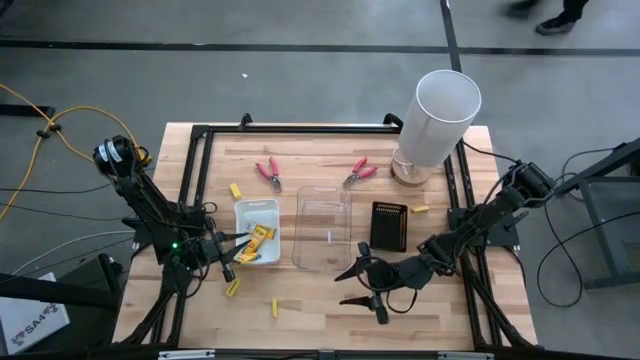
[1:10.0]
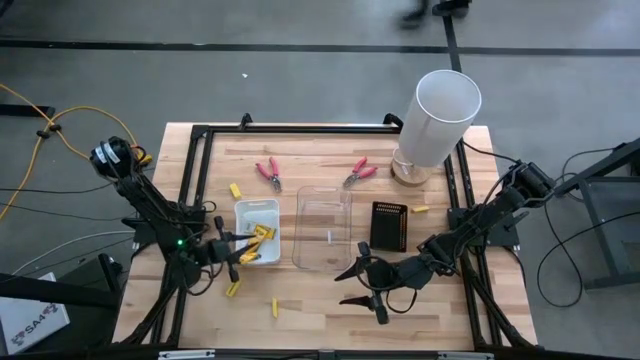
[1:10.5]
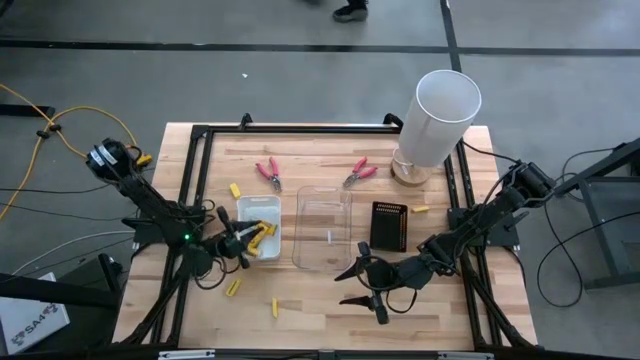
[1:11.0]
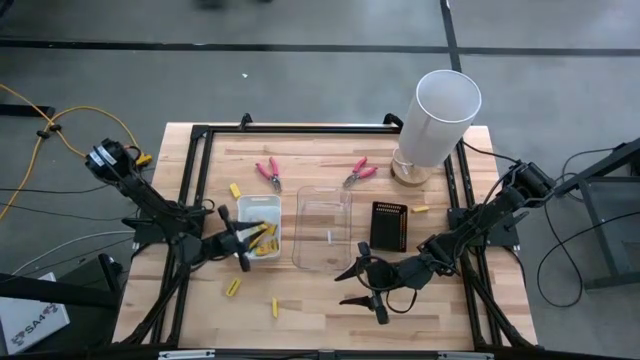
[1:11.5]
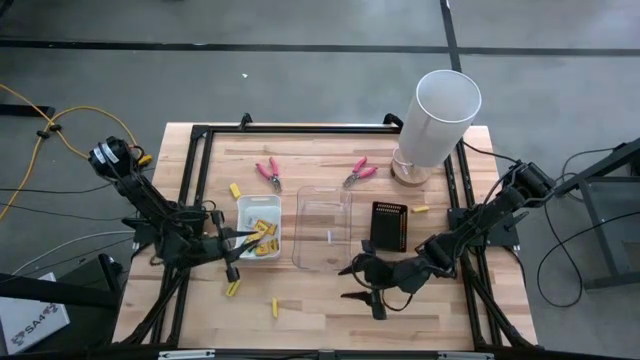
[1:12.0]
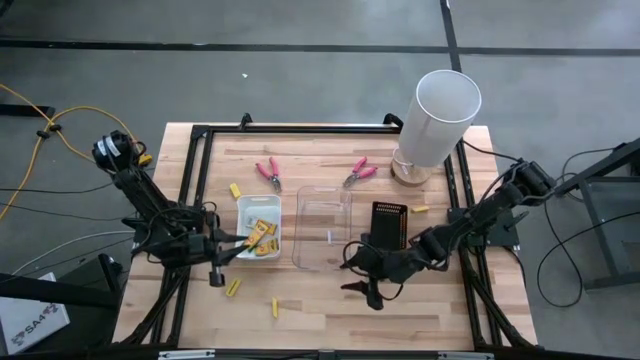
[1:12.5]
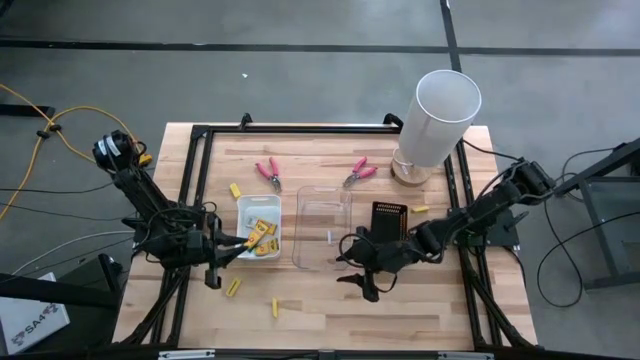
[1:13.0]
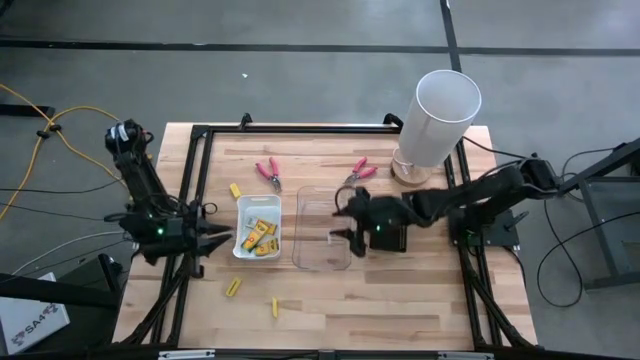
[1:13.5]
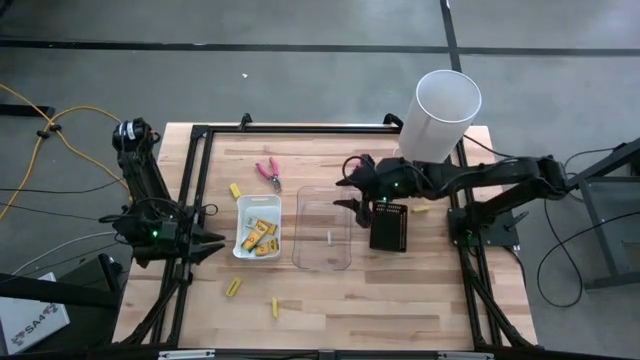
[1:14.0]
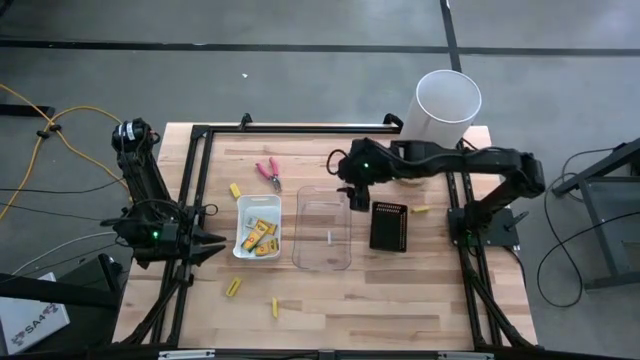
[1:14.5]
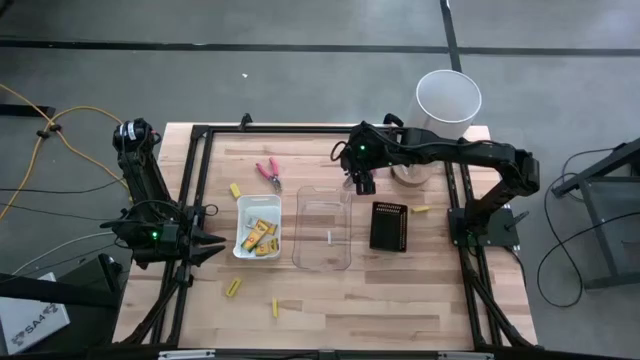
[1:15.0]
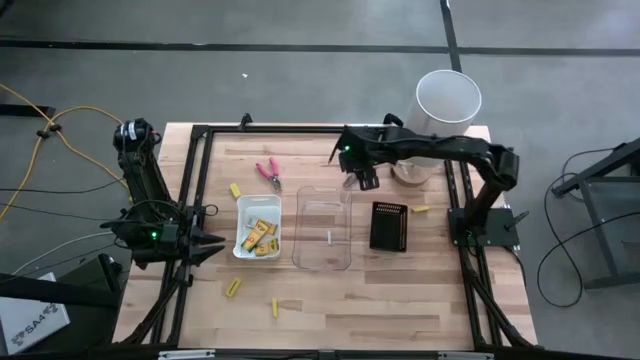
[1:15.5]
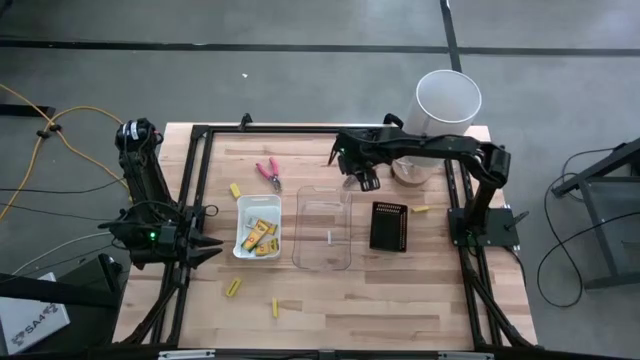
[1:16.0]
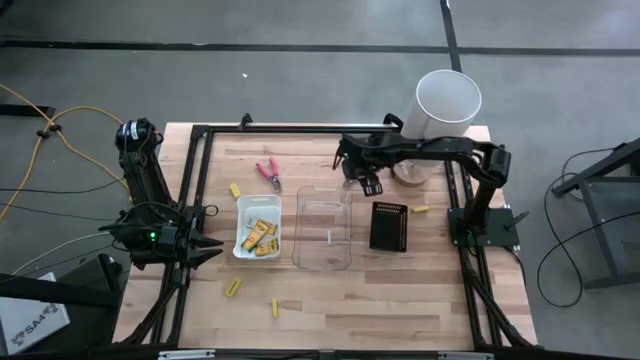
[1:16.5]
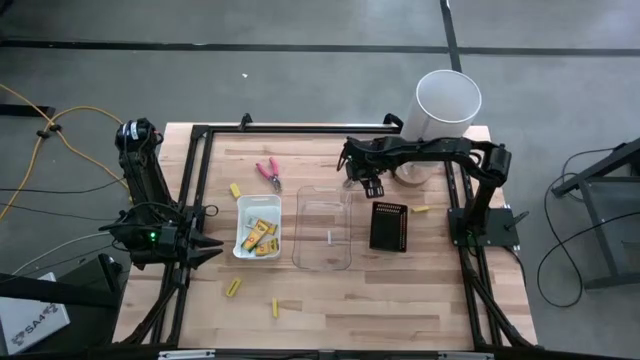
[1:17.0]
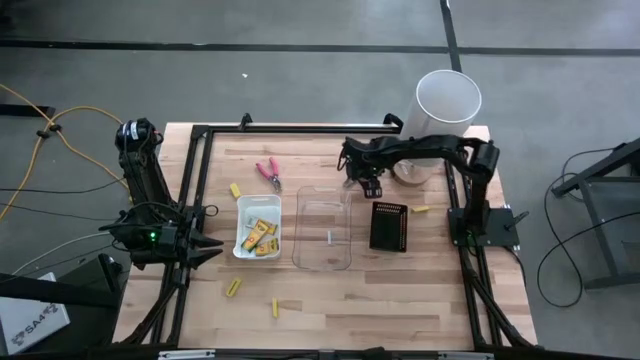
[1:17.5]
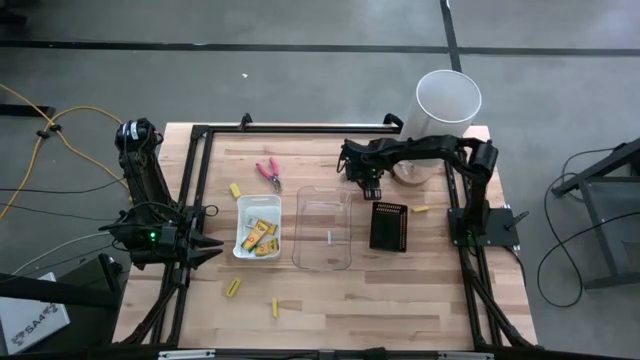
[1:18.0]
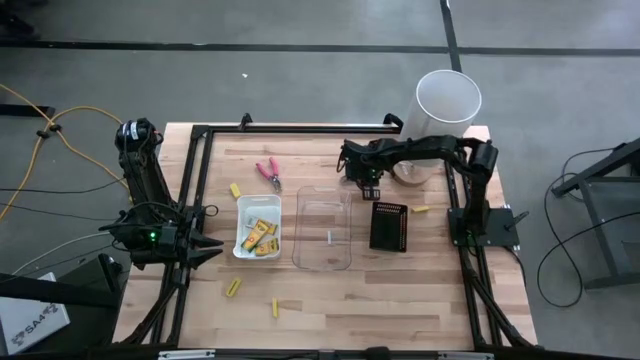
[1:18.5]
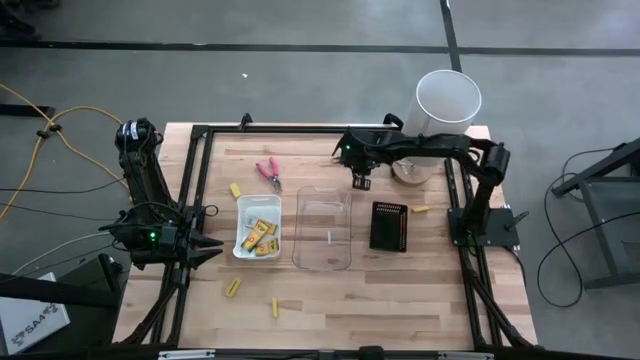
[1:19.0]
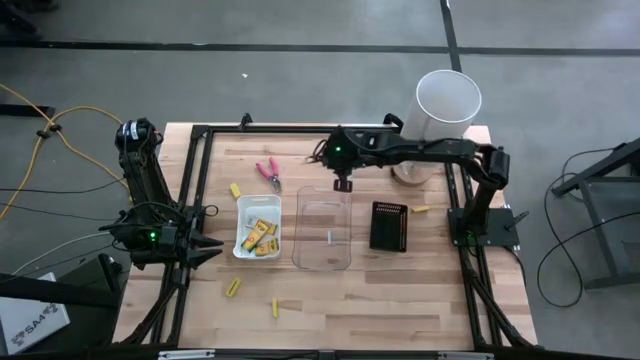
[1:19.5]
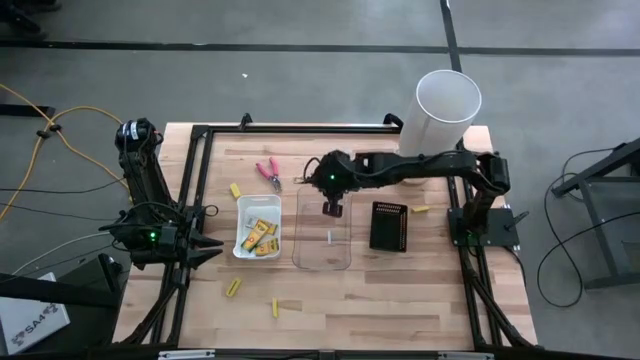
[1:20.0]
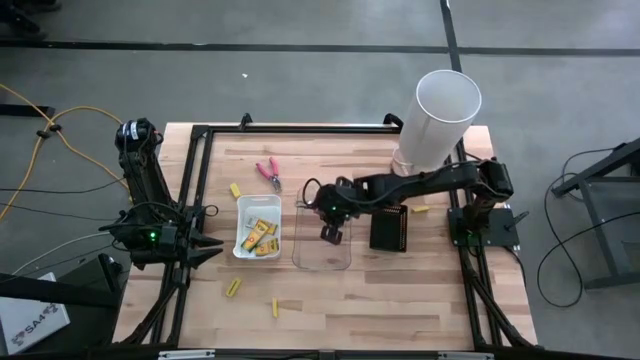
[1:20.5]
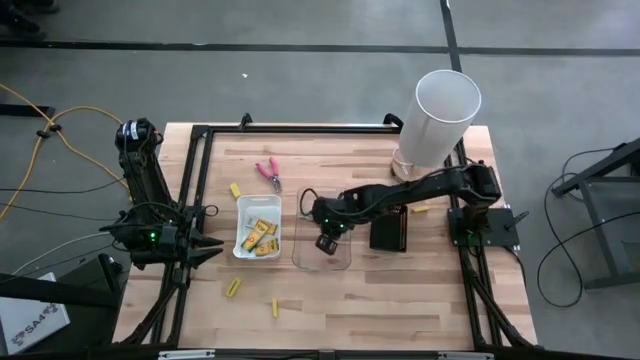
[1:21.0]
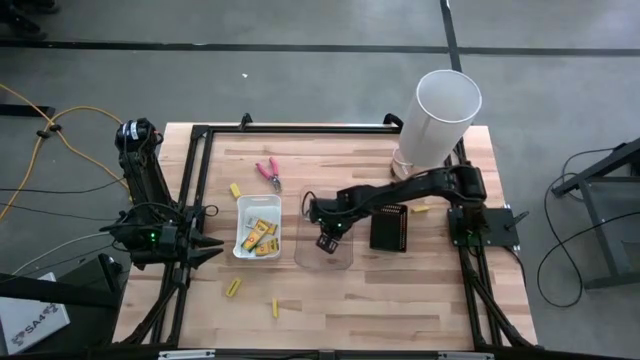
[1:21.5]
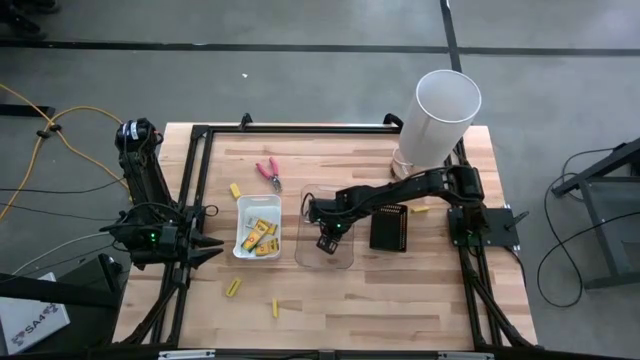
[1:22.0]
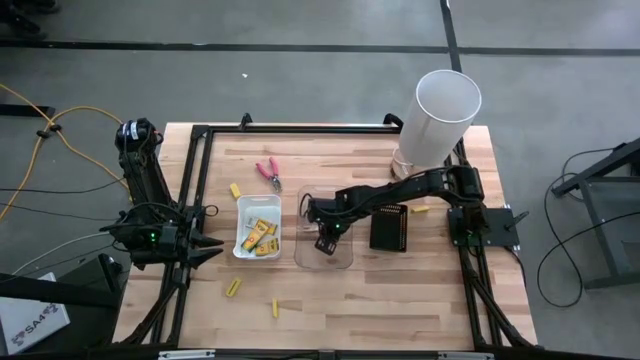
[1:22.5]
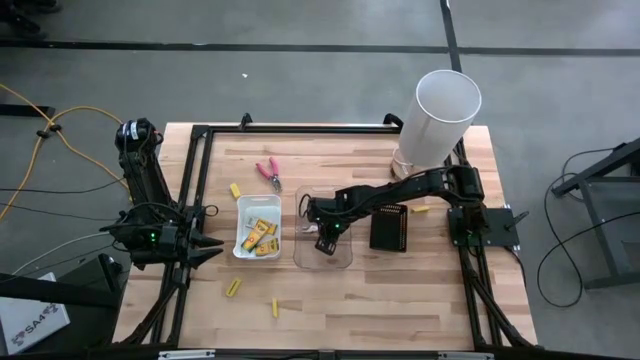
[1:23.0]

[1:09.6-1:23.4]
Task: Pick & Place School Supplies
Put the pink punch plier into the transparent bin

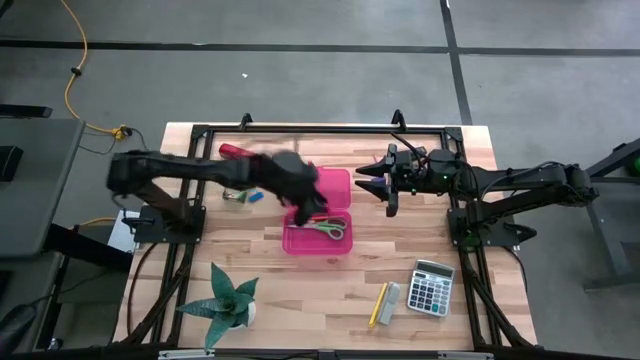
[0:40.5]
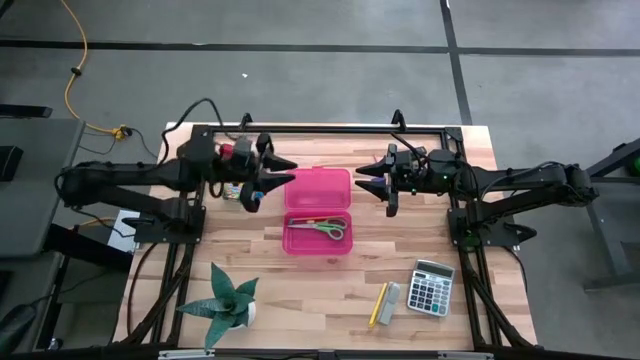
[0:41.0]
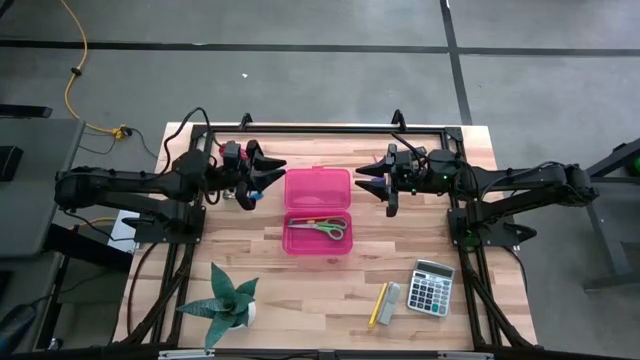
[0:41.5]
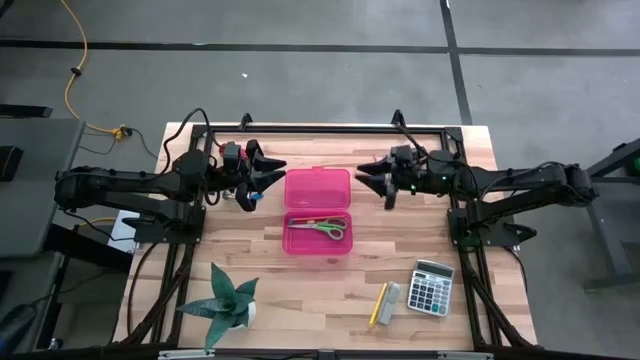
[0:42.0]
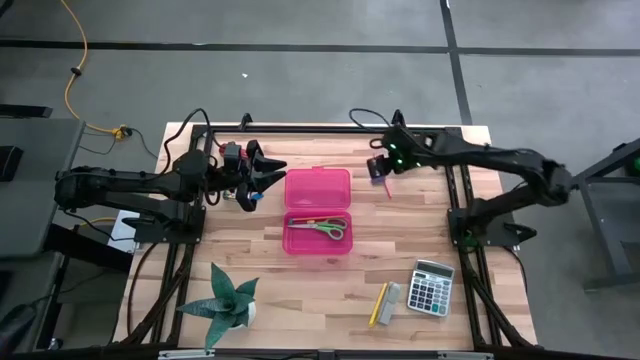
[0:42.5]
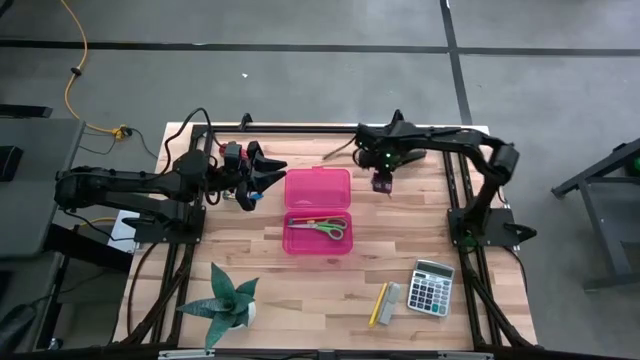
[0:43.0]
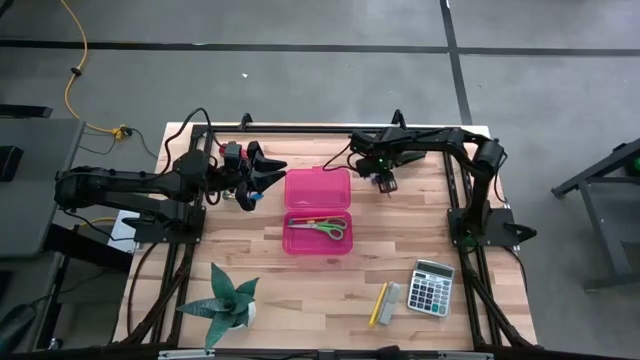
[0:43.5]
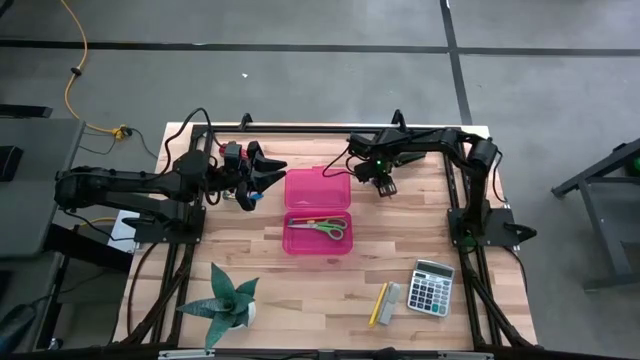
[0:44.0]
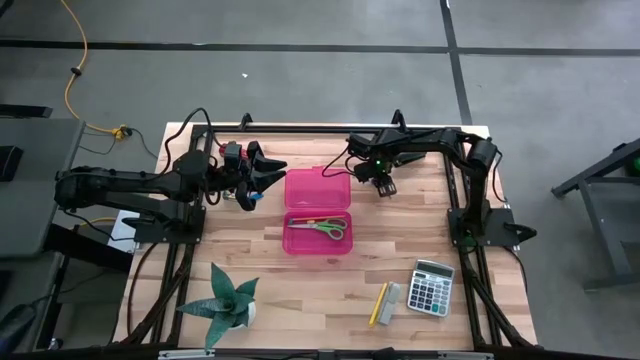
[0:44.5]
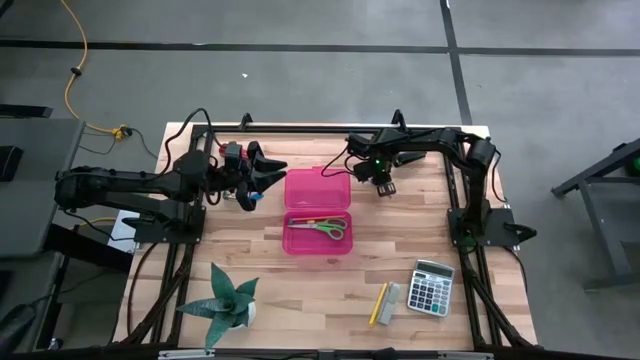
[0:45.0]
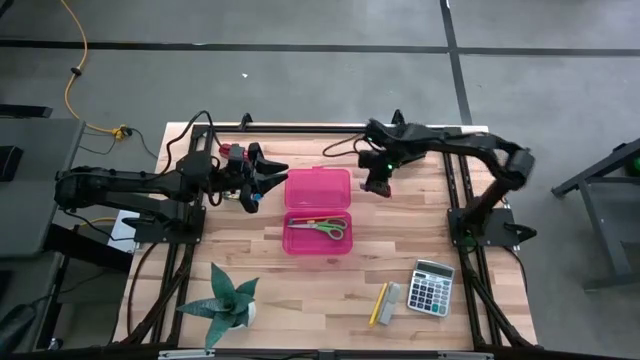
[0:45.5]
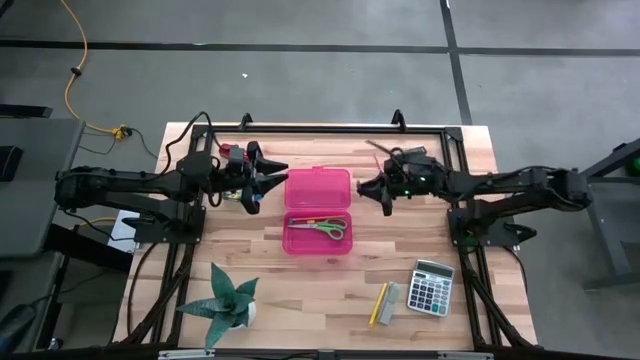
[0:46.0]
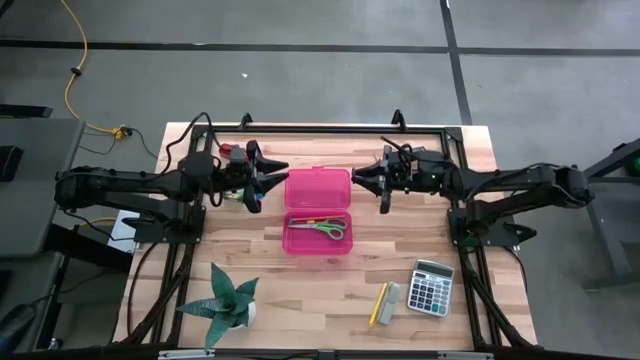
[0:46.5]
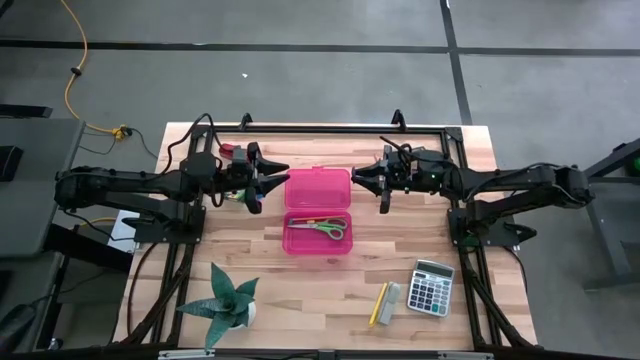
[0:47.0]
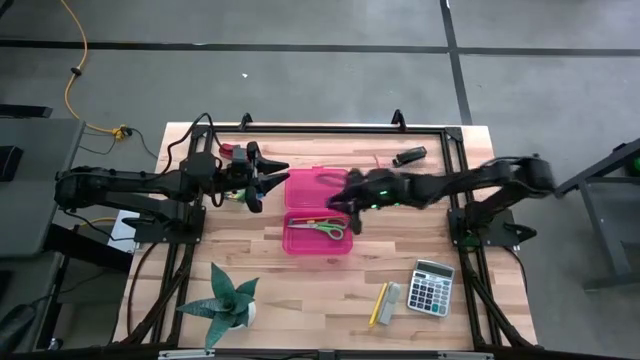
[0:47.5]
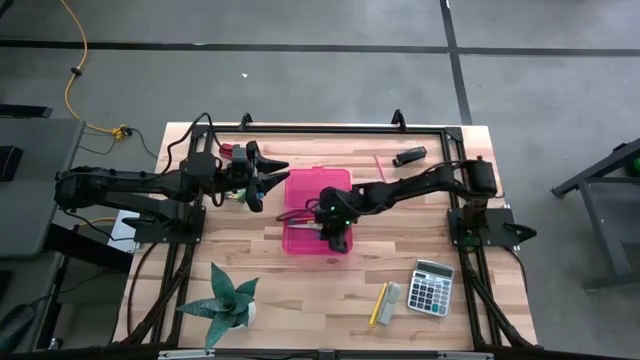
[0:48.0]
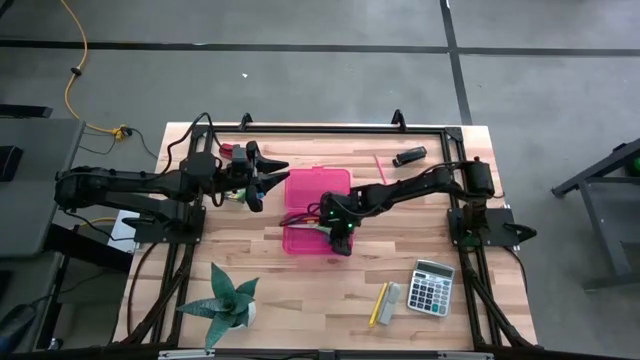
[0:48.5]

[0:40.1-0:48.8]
Task: Pack school essentials
Put the right blue eraser into the pink supply box
